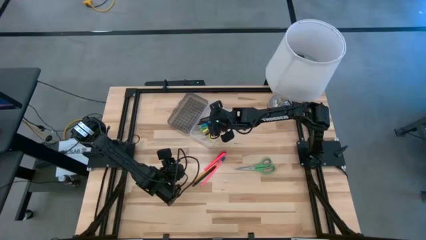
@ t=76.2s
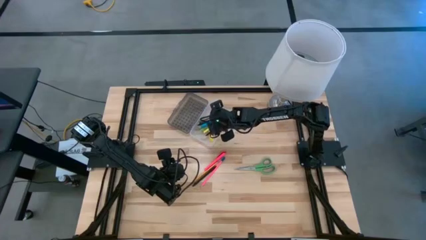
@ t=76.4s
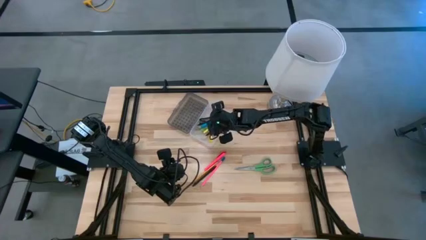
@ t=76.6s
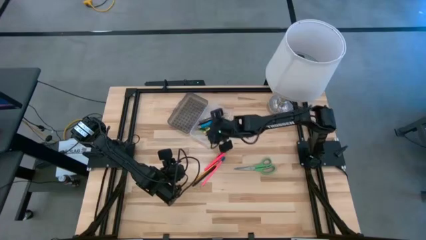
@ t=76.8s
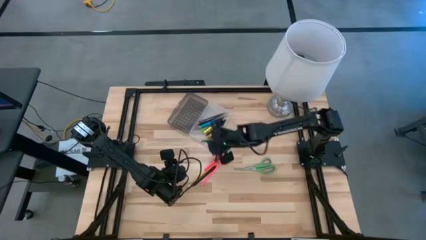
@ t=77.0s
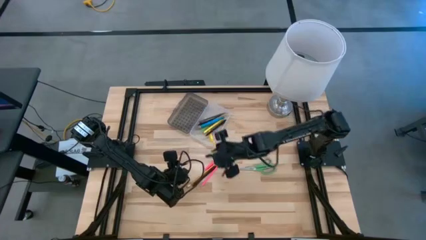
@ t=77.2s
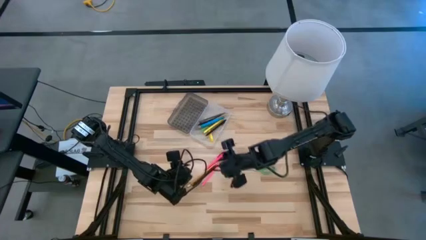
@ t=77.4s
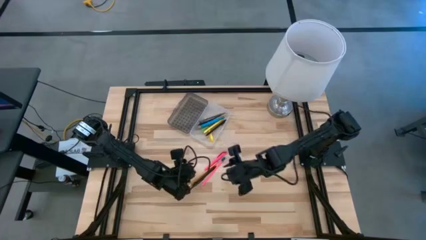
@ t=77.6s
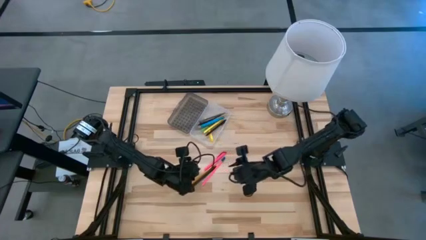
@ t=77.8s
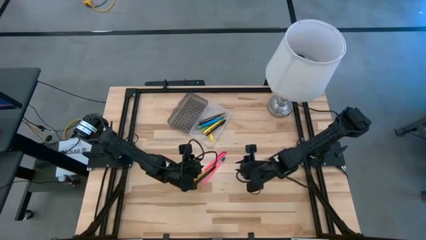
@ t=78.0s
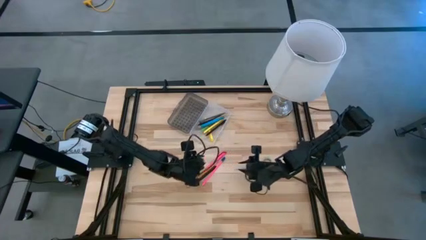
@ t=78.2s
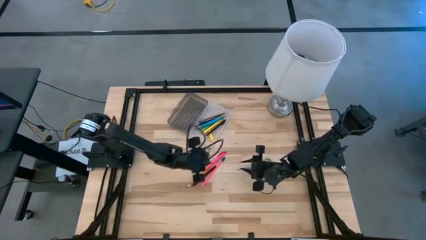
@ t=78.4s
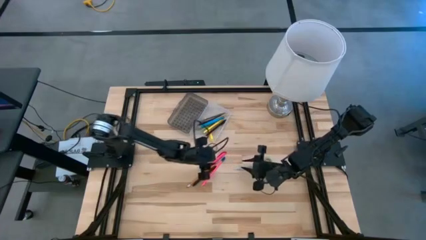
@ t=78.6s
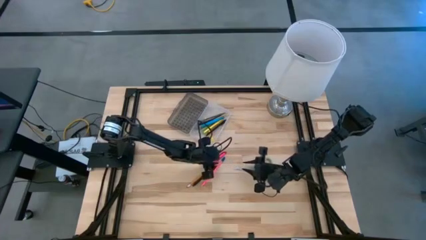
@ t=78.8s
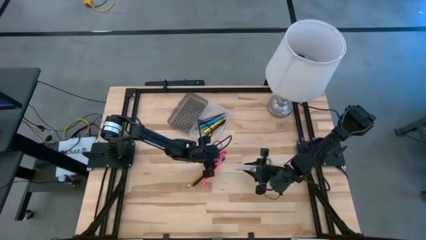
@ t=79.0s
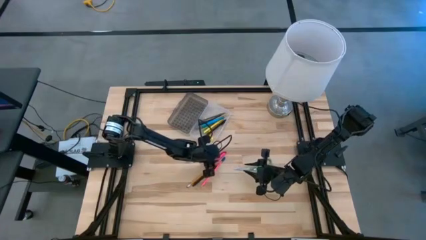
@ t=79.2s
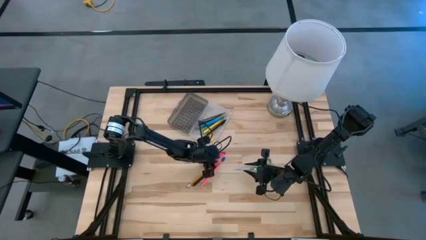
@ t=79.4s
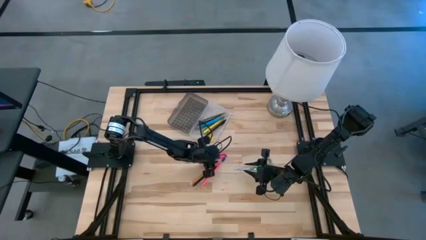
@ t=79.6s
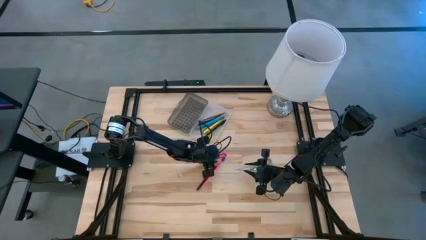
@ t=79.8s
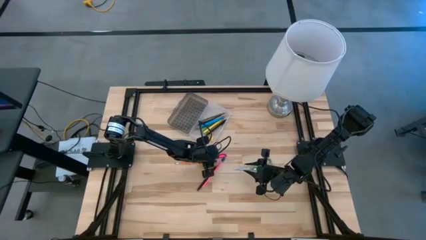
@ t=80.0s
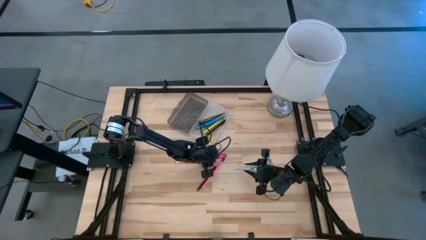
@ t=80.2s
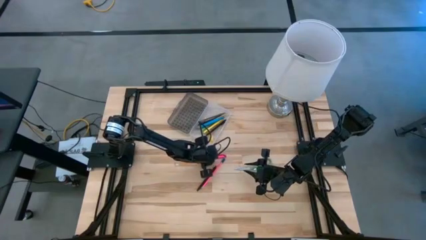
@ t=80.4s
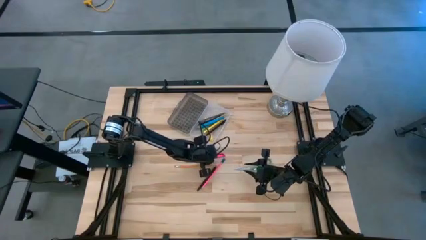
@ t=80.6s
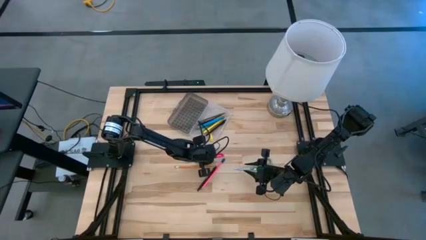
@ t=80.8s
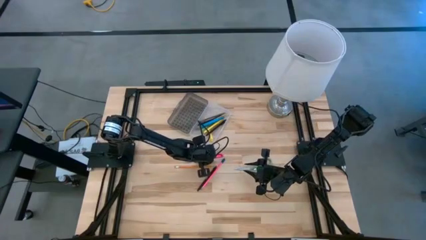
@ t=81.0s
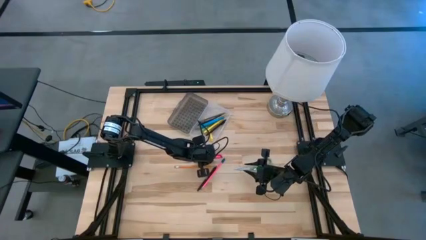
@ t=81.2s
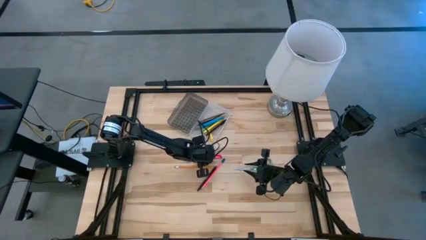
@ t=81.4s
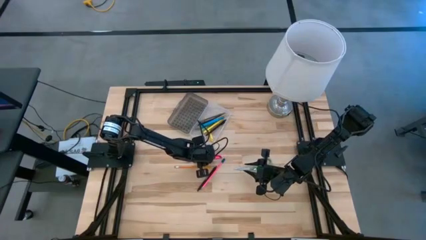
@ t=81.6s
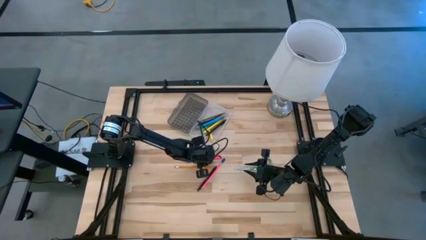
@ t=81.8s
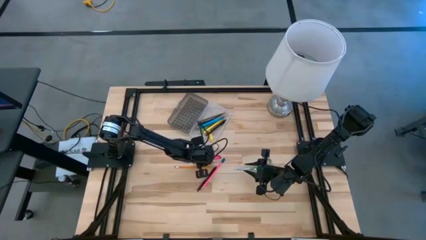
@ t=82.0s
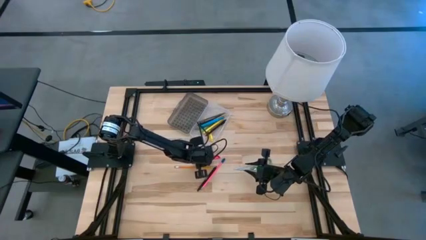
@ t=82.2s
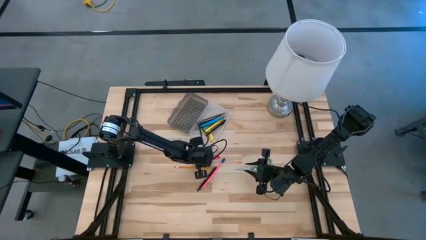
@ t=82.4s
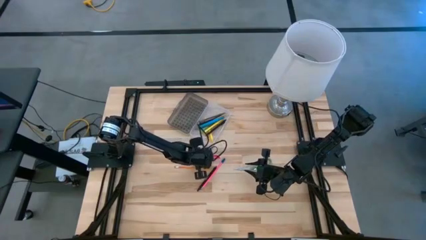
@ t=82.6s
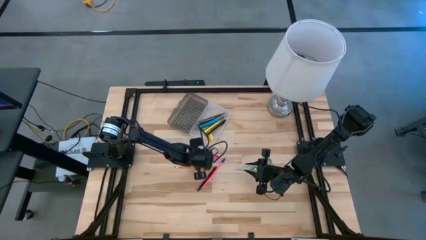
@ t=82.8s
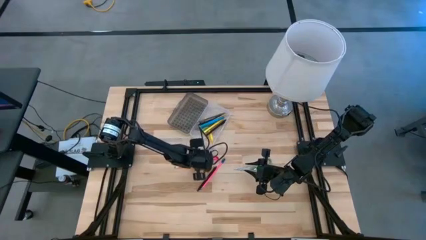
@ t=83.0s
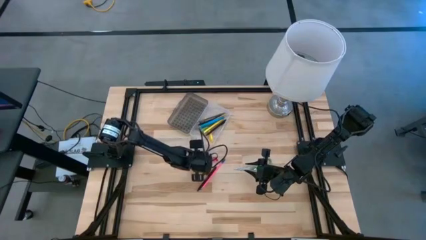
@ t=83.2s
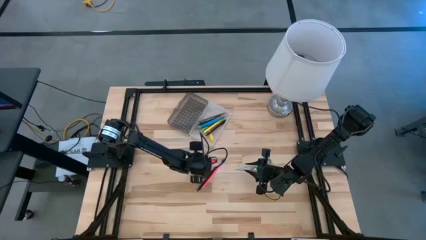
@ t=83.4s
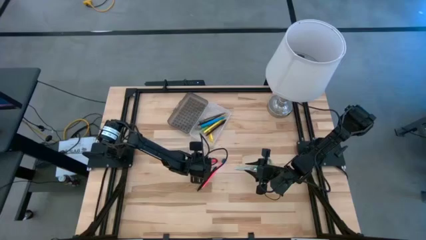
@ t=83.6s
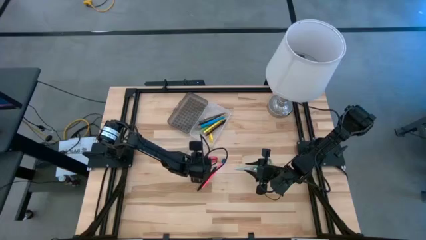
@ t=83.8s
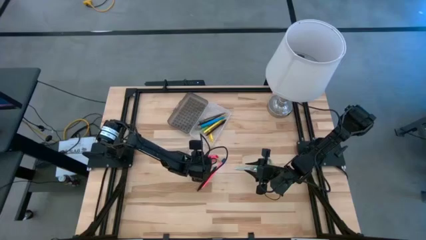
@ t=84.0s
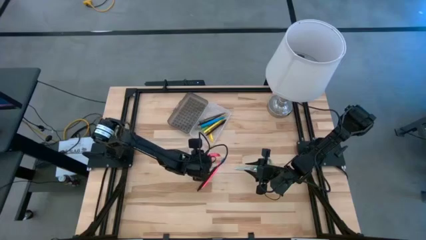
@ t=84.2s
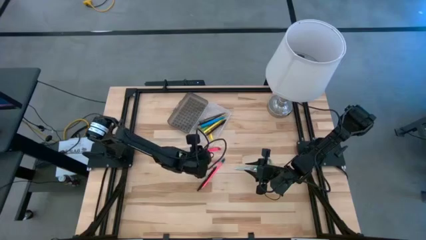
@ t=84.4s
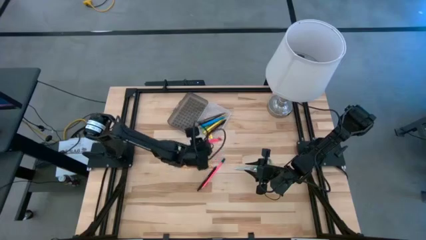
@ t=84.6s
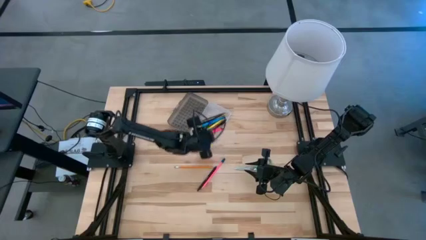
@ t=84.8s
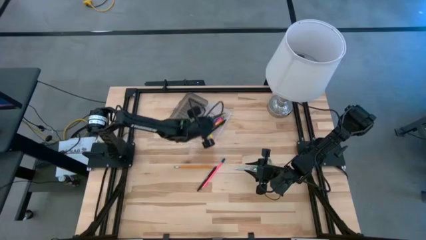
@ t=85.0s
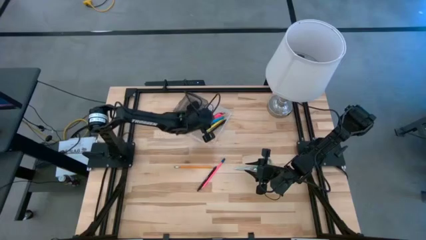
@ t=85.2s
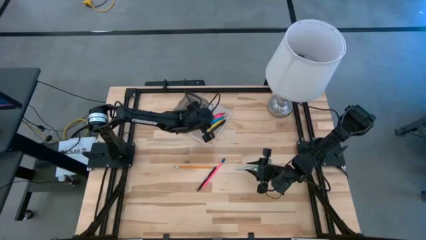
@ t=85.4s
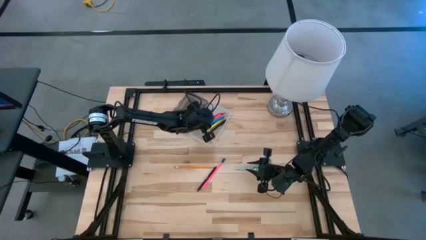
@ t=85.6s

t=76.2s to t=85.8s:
Task: Pick & place school supplies into a supply box
Put the pink pen into the supply box

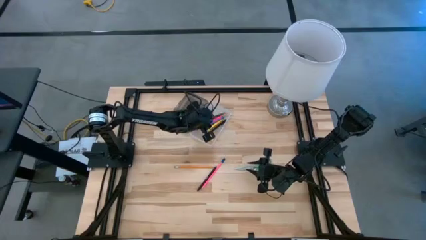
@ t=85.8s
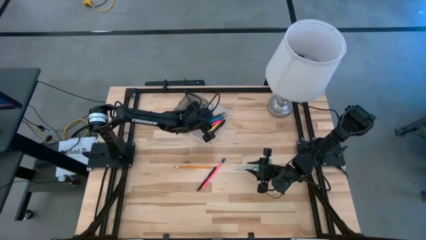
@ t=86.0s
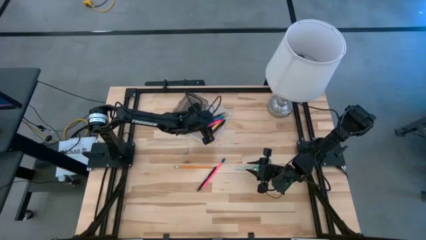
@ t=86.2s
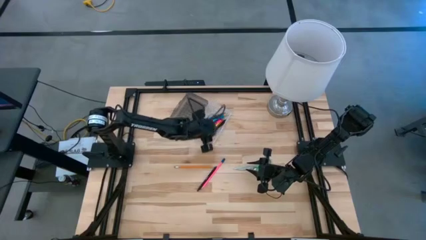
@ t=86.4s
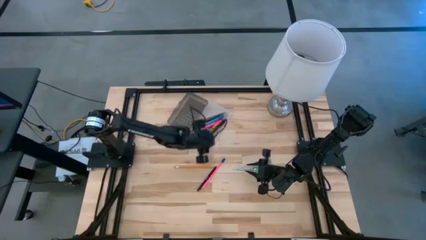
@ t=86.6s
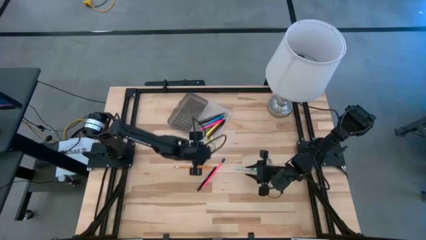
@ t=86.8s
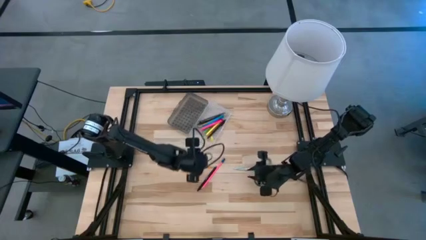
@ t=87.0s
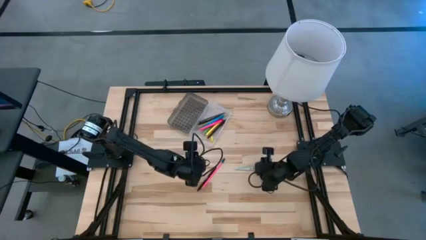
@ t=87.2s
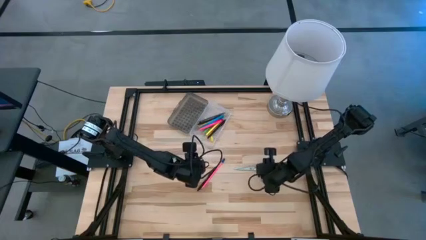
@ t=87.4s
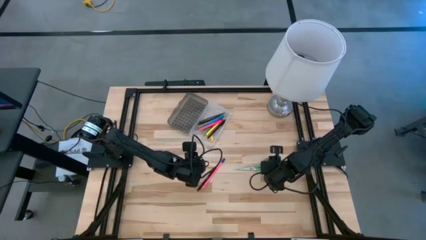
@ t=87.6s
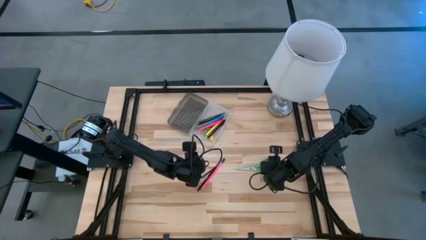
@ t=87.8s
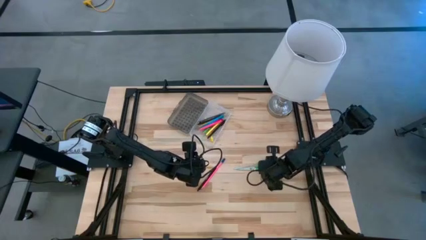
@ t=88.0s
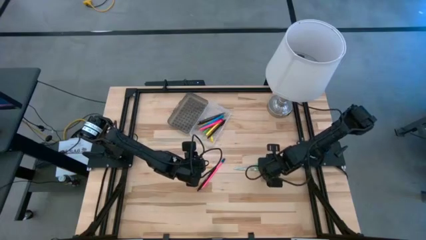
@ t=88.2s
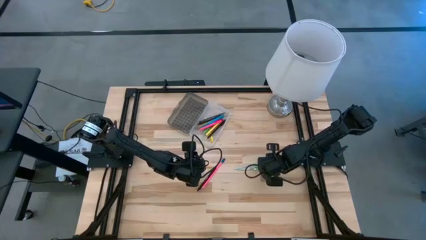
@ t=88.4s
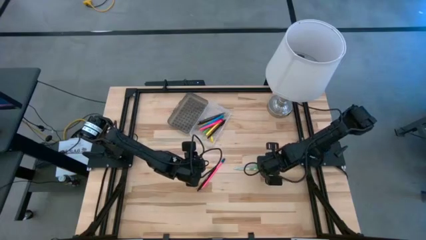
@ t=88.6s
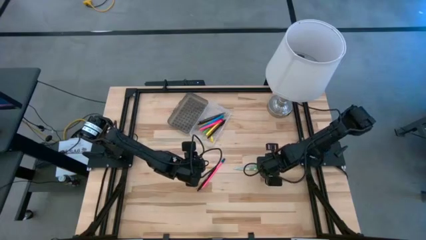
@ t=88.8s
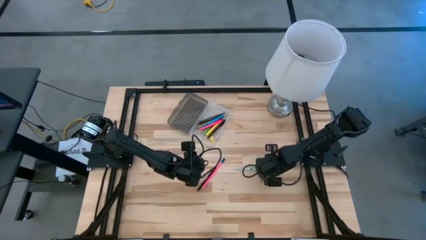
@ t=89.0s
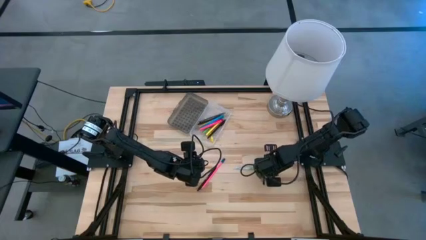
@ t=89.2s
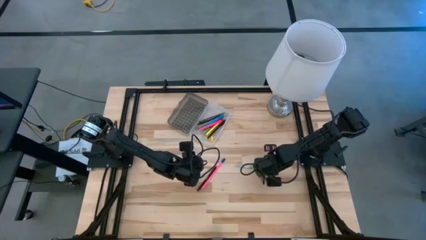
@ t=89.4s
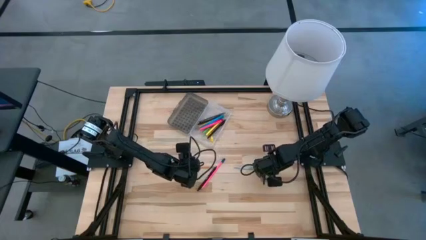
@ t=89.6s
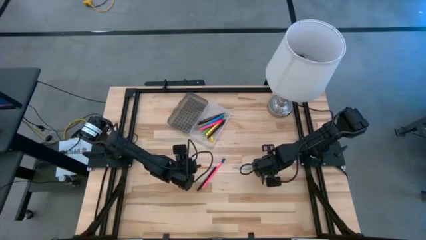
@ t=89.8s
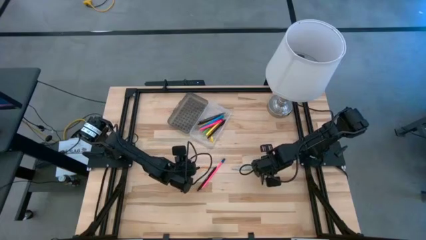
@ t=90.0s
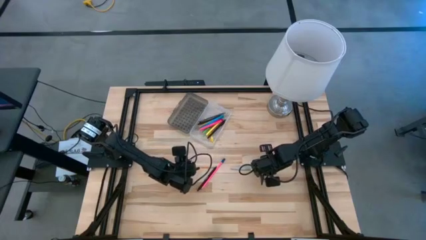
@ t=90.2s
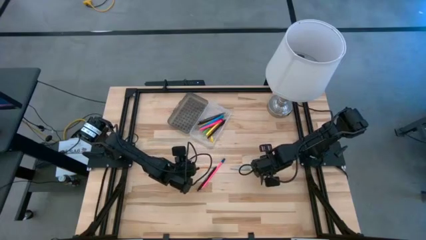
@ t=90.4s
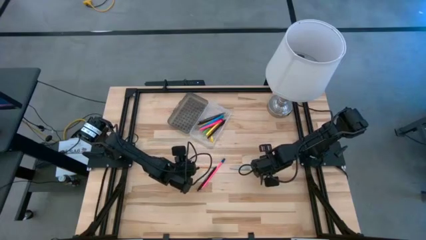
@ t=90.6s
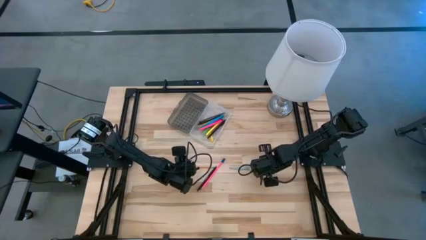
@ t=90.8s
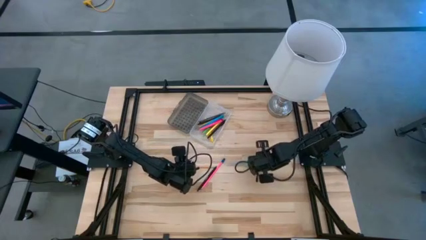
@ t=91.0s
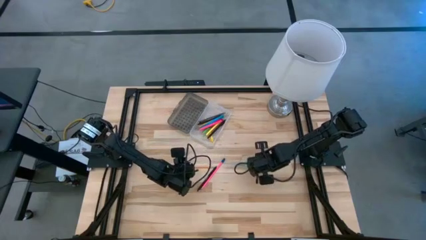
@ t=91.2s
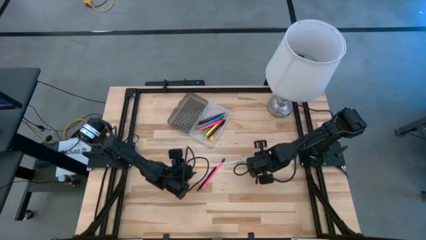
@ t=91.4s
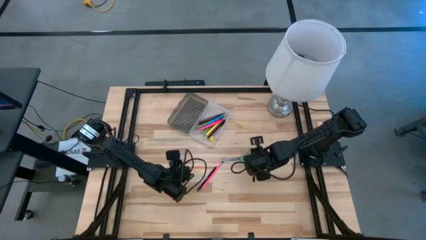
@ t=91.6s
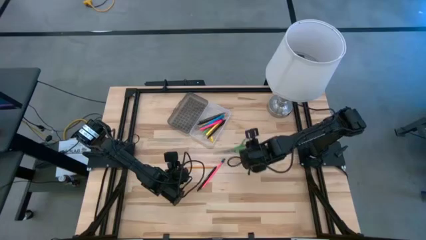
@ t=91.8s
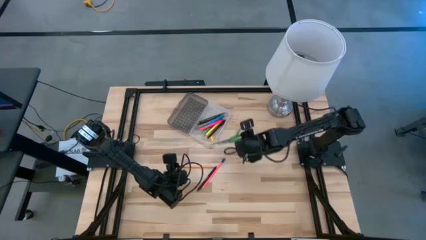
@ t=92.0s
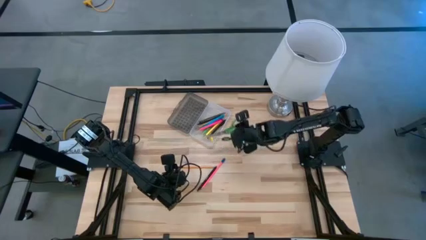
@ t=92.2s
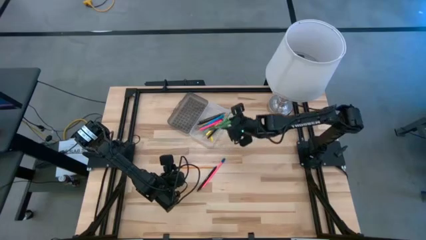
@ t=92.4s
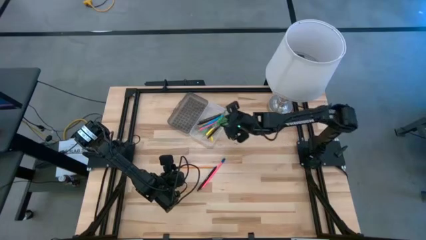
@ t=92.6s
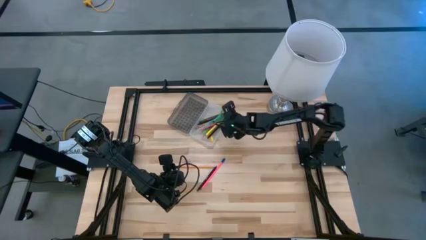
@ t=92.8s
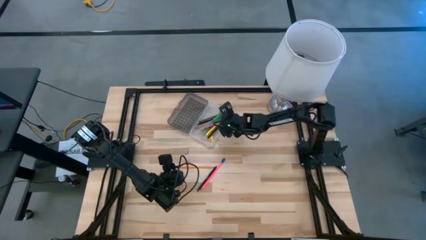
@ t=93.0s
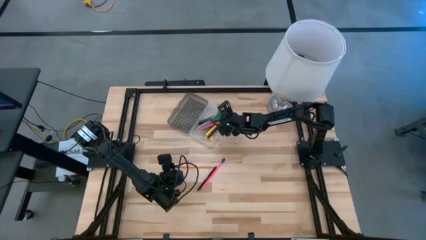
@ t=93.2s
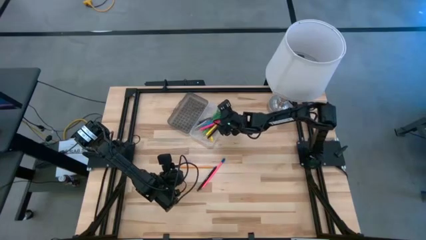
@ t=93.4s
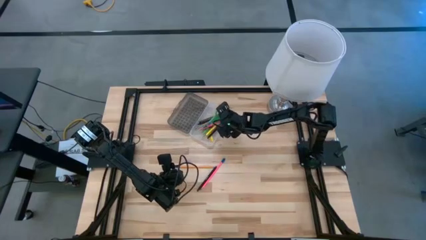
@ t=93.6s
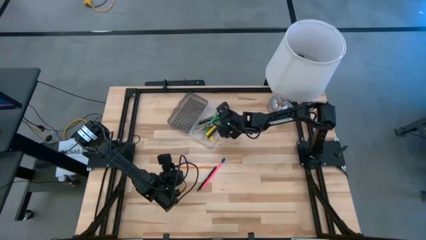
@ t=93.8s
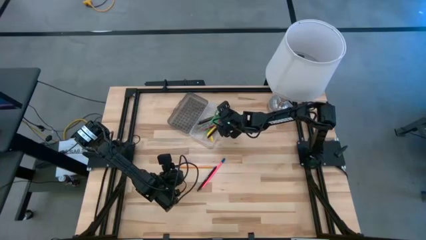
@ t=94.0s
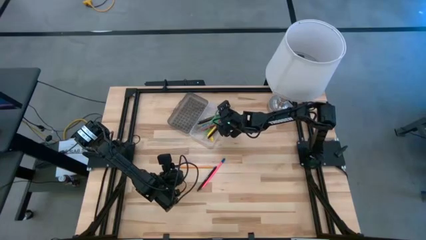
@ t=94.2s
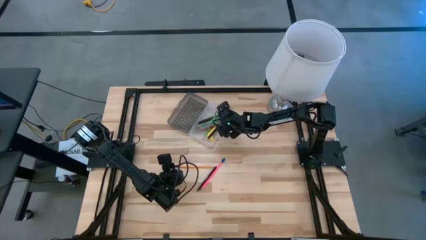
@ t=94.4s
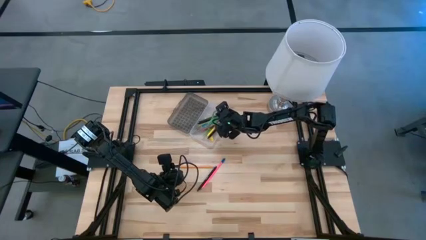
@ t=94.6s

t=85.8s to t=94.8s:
Put the green scissors into the supply box
